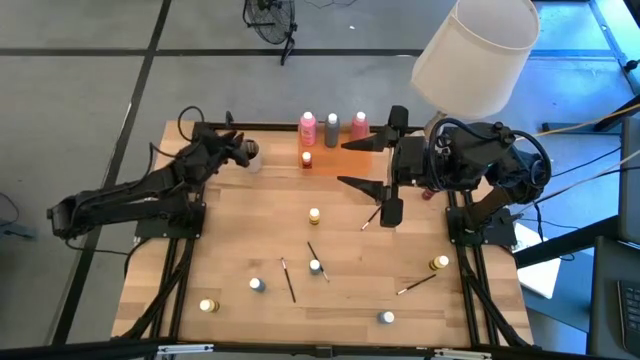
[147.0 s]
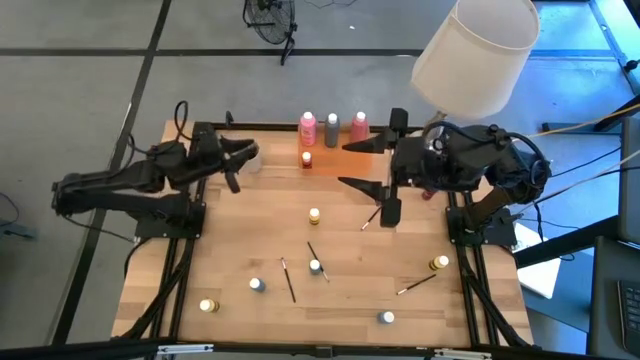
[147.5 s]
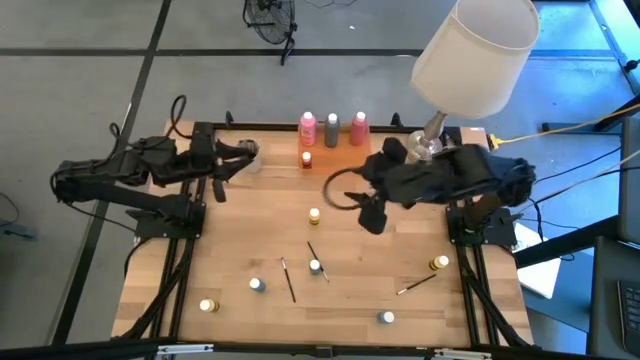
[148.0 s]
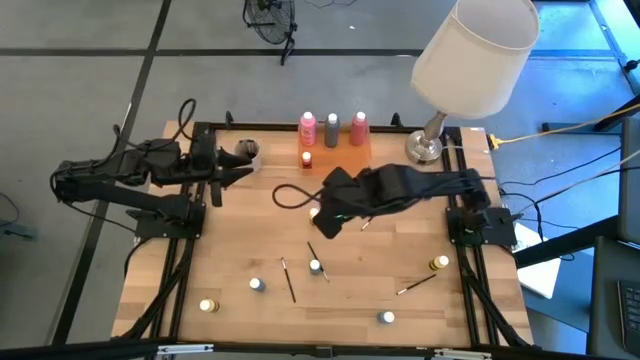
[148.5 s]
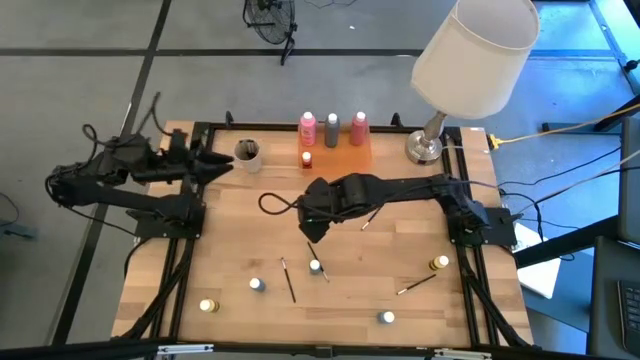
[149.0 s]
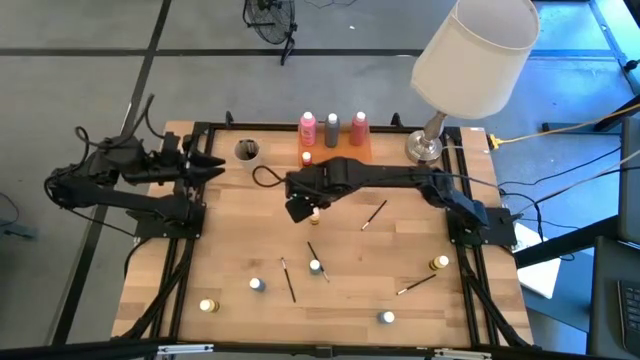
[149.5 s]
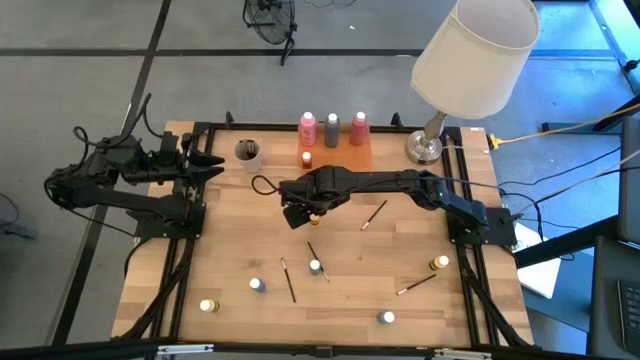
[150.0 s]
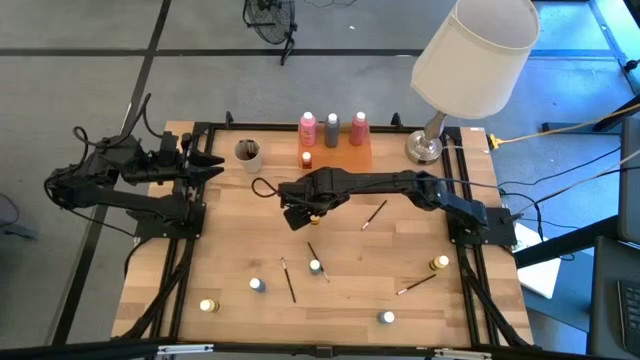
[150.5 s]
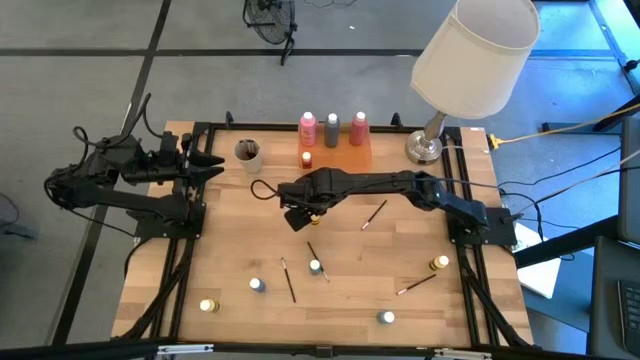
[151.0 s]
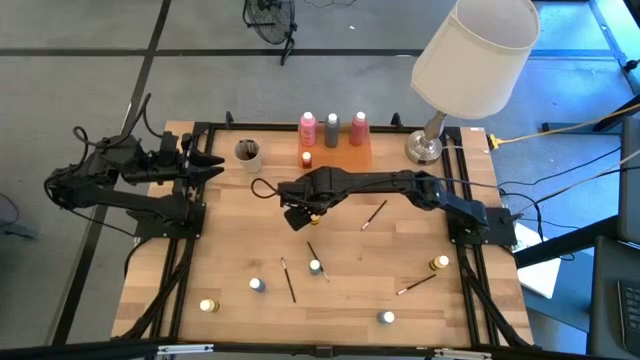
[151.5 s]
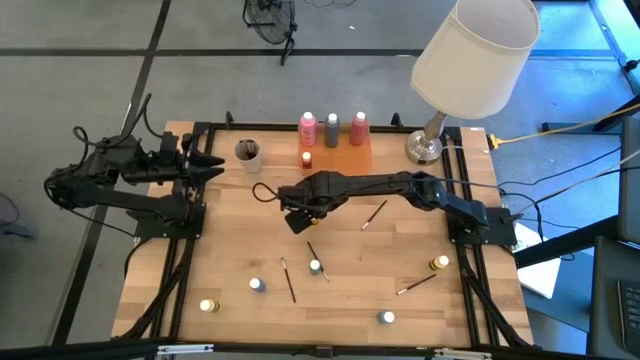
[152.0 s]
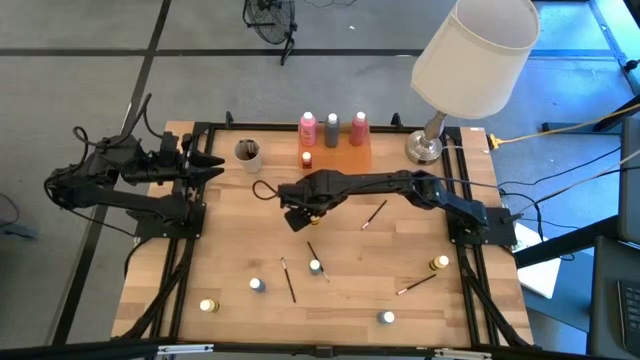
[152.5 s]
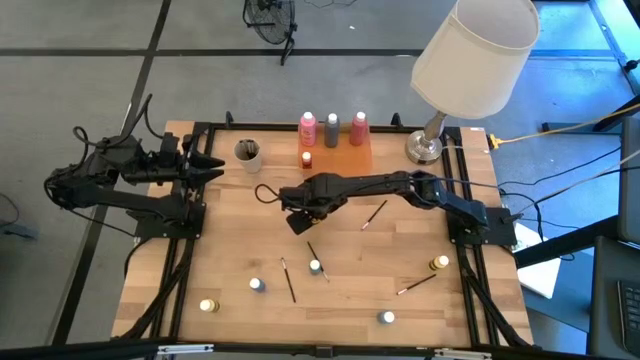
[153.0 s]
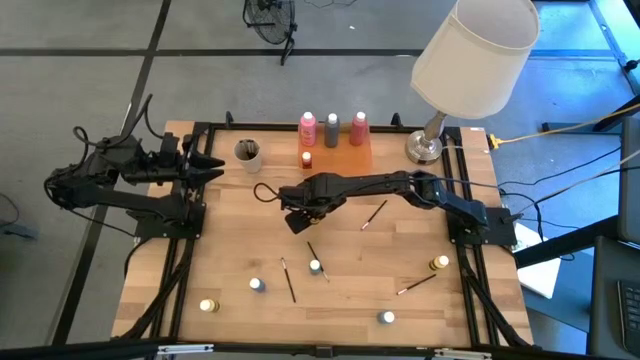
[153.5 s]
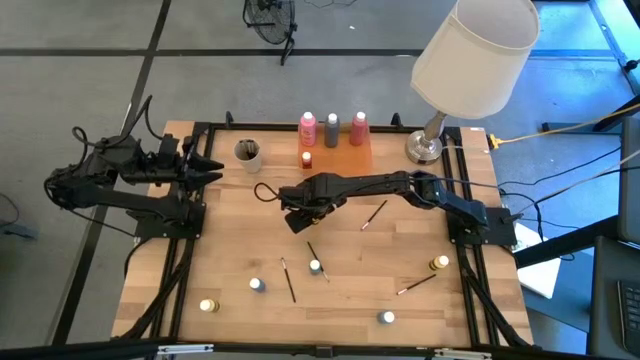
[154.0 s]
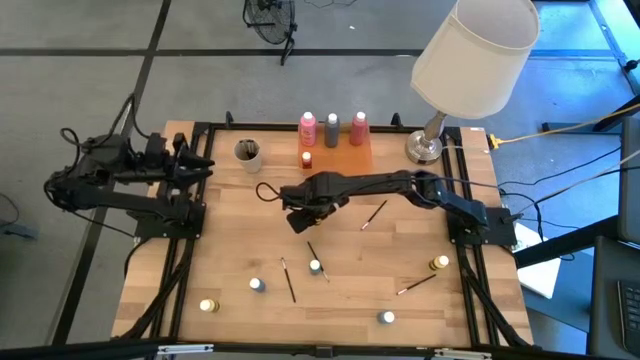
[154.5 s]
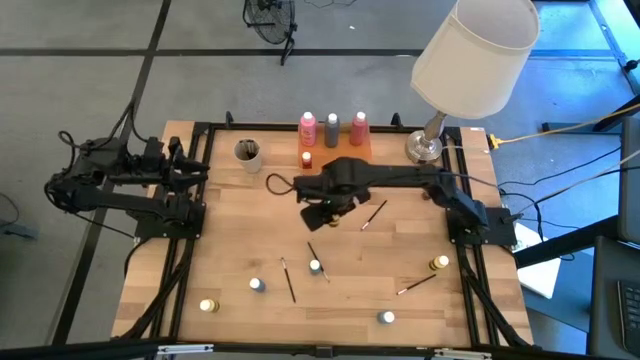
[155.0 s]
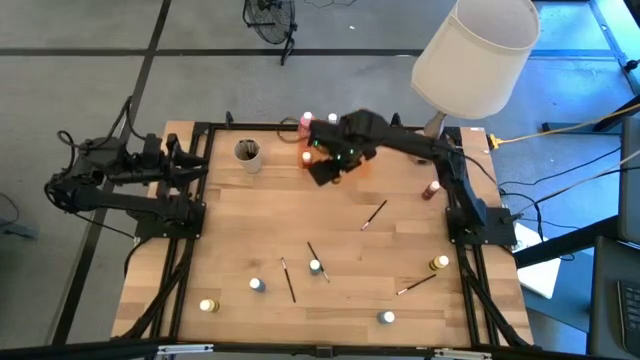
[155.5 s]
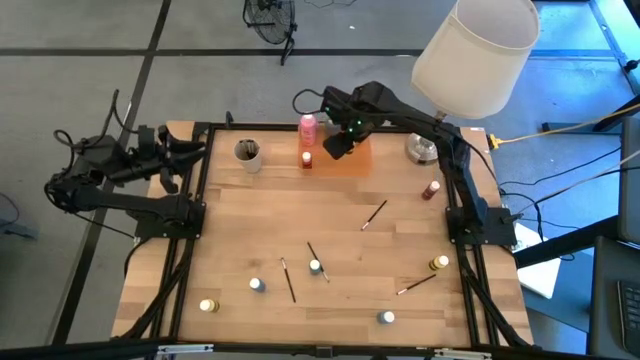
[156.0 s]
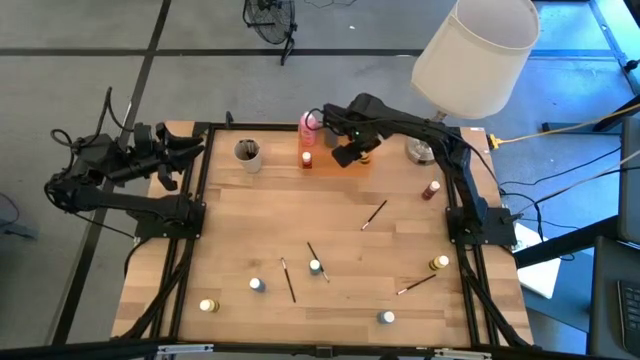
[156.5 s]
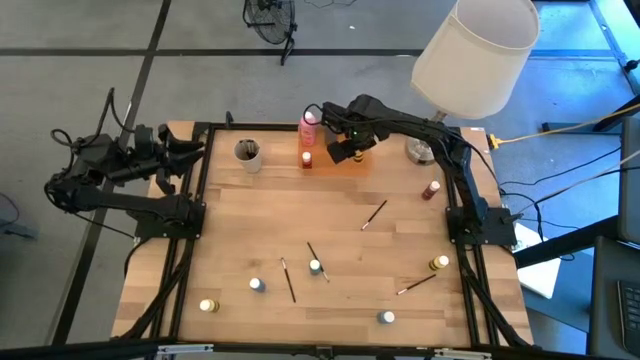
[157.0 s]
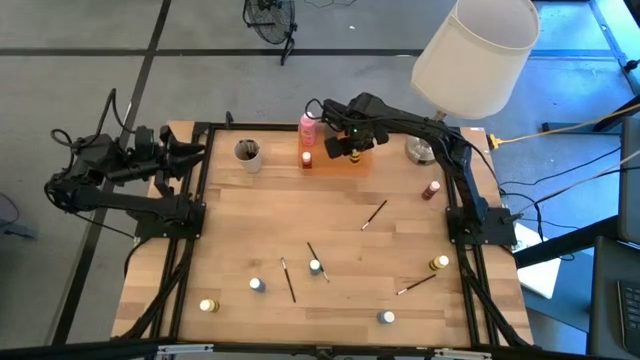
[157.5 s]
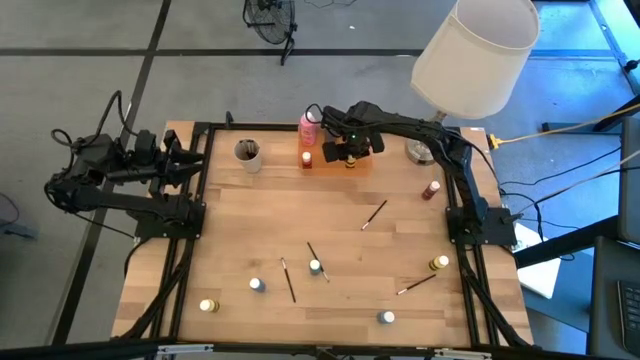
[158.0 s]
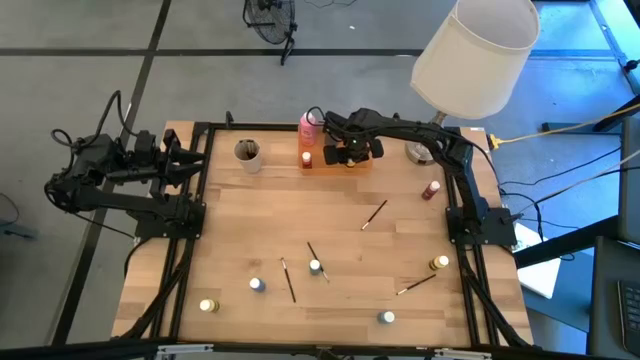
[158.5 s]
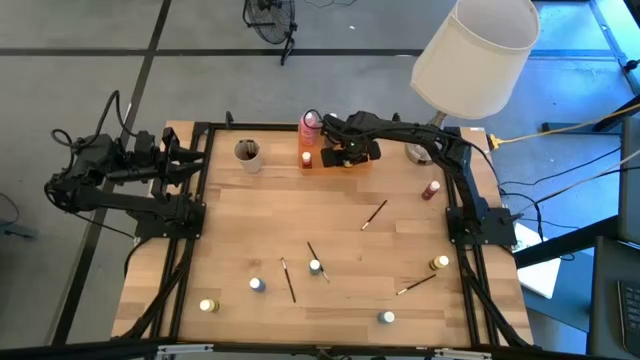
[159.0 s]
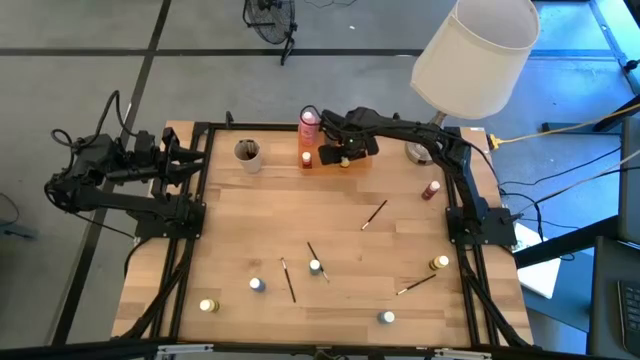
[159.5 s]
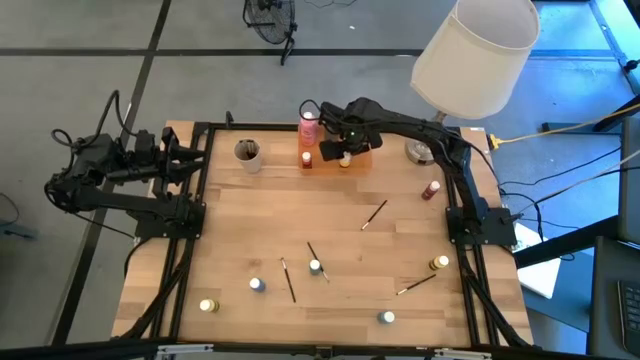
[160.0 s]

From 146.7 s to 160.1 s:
Task: Pick & Place Paint Supplies
Put the yellow paint bottle into the orange bin

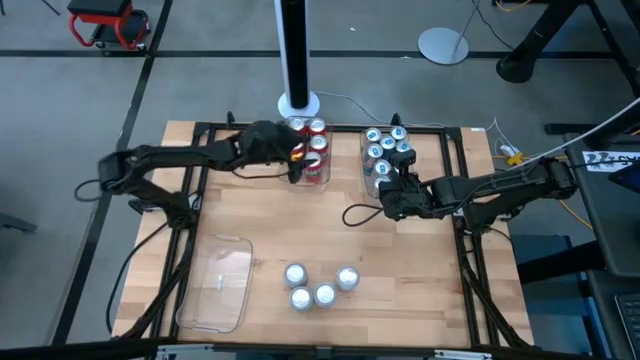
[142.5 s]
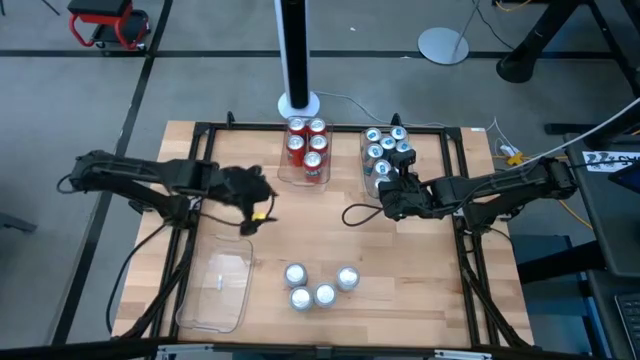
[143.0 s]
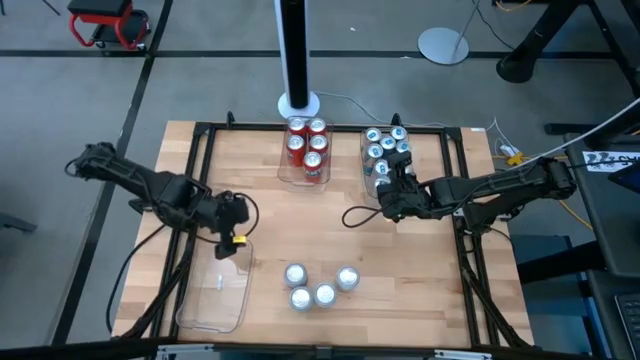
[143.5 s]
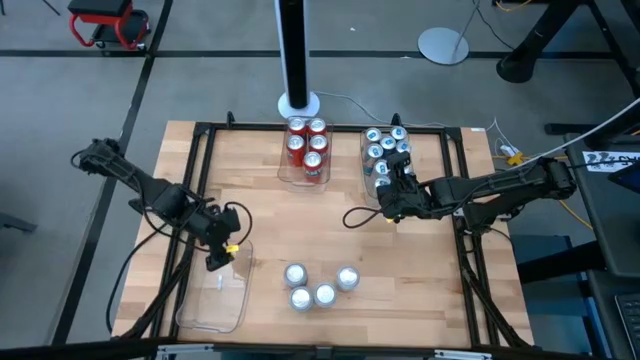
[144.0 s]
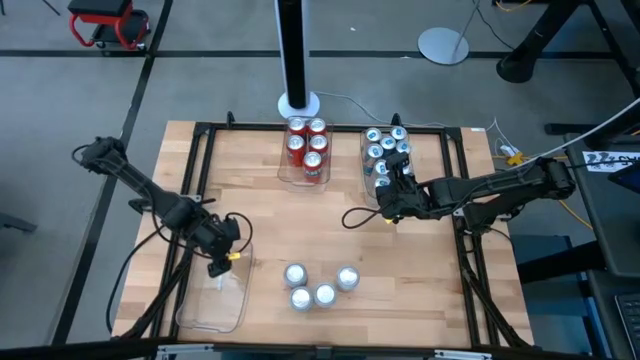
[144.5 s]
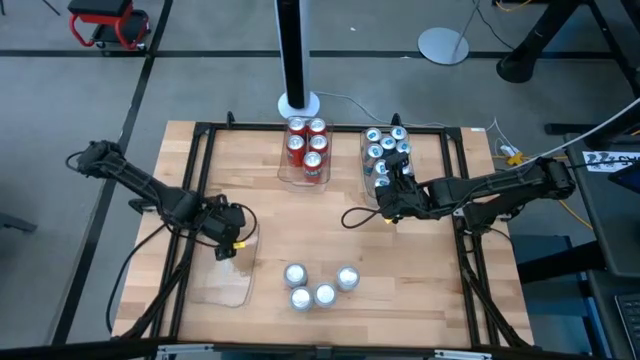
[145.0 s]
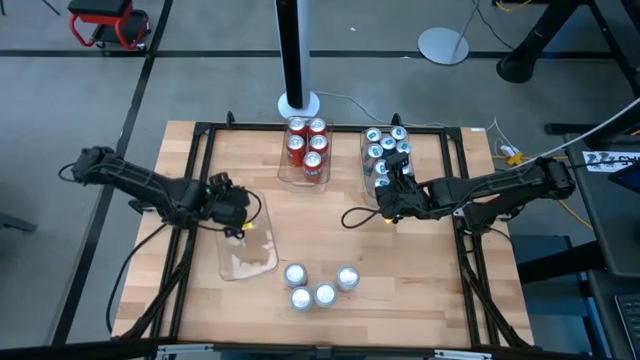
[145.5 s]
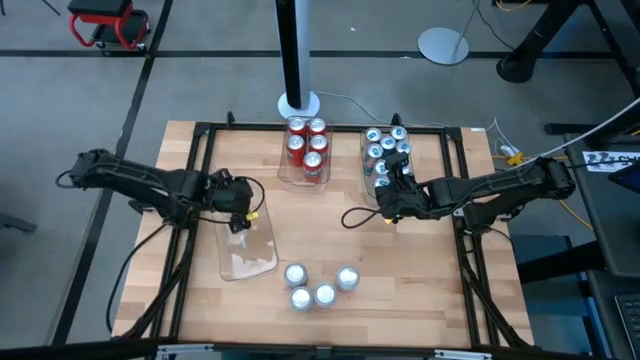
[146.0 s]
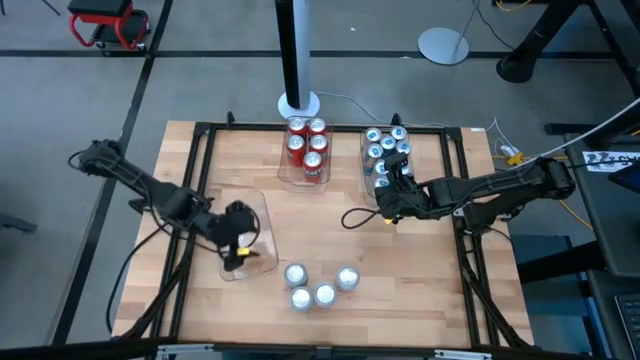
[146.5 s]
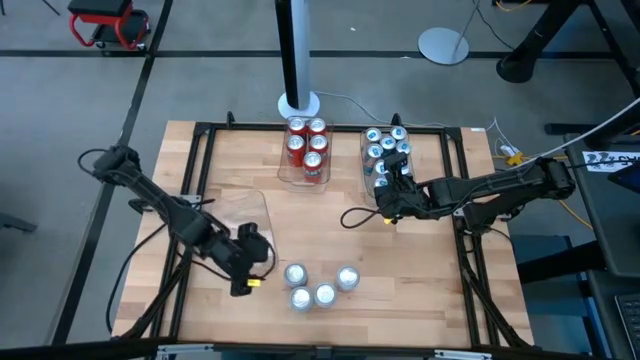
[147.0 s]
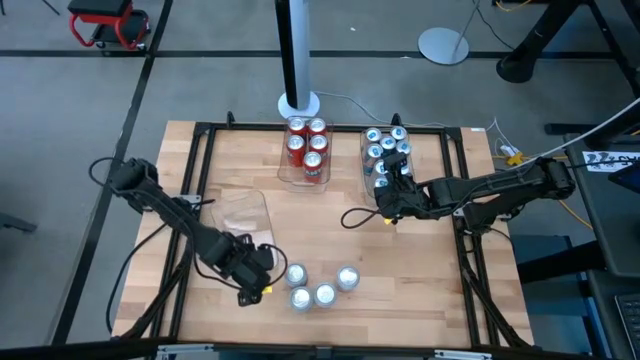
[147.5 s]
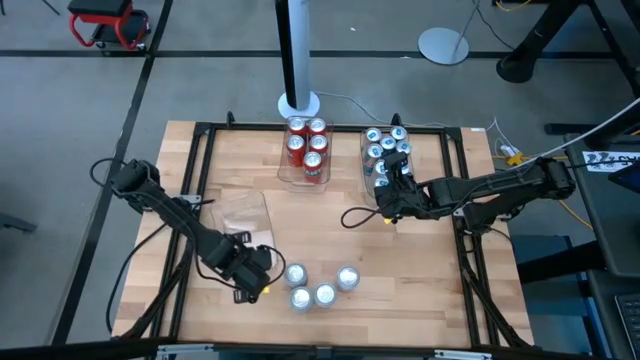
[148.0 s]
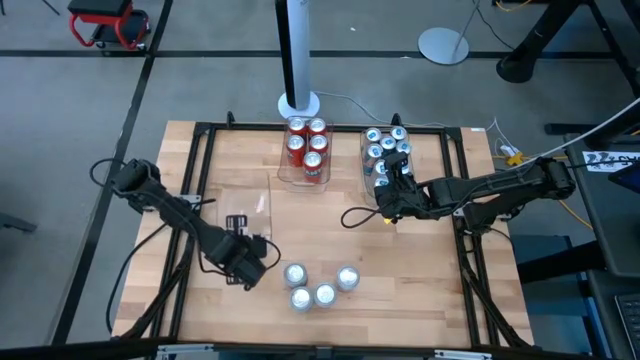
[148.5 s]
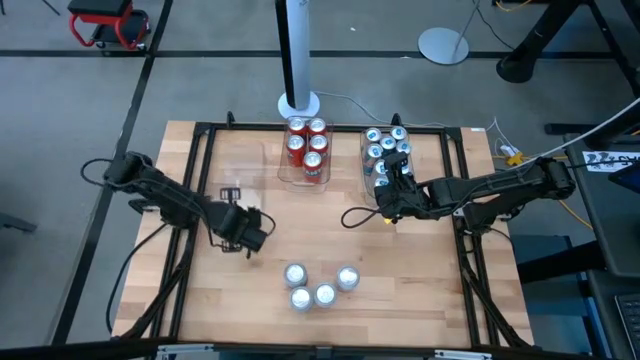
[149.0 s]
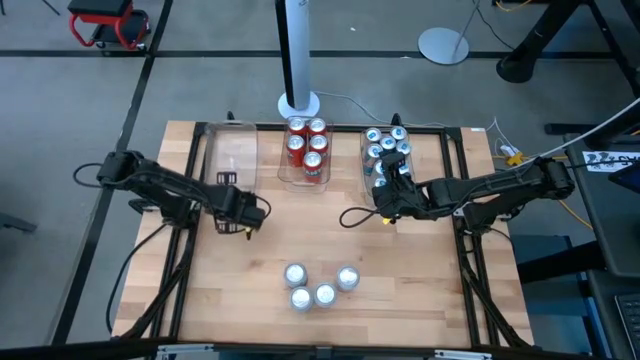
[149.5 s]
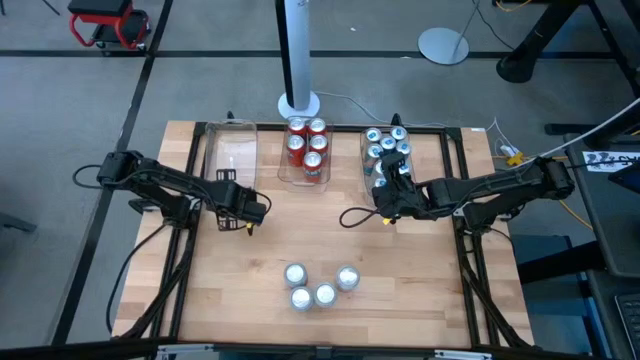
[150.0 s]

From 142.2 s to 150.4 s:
Task: Sort soda cans
Move the bottom left transparent bin to the top left of the table
